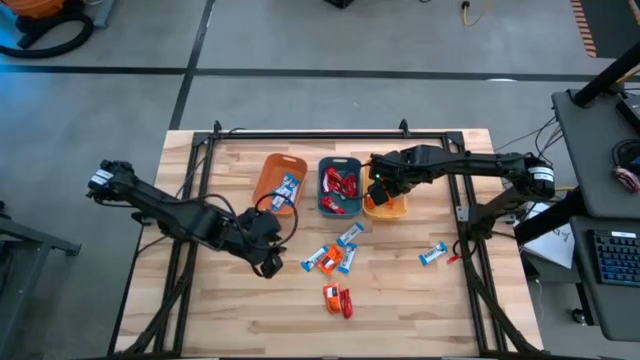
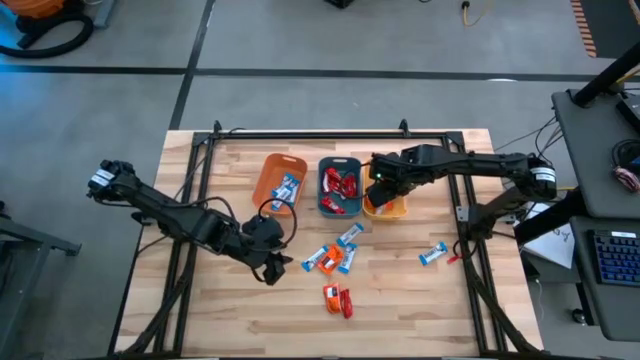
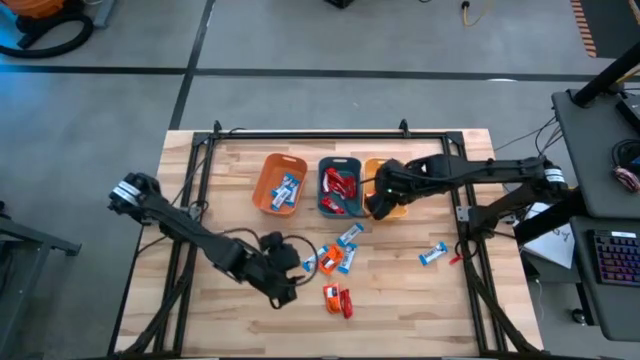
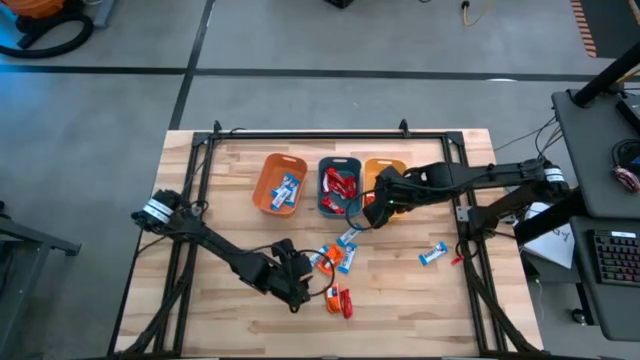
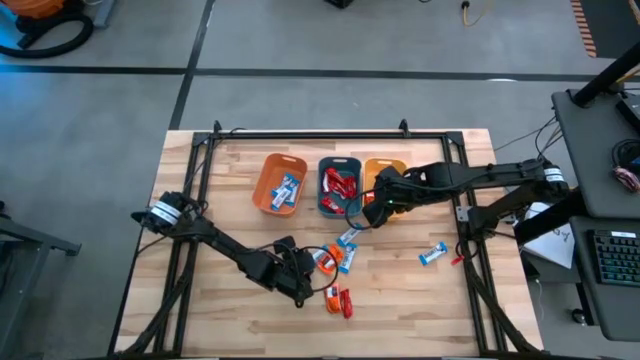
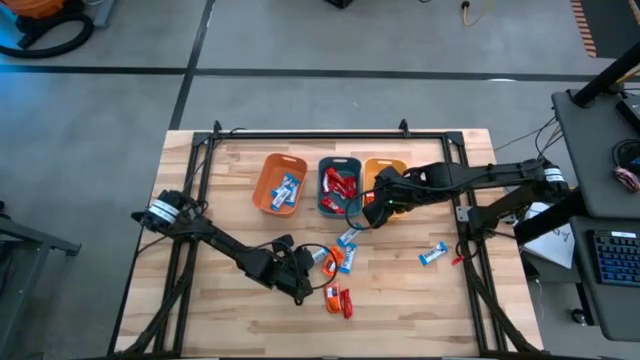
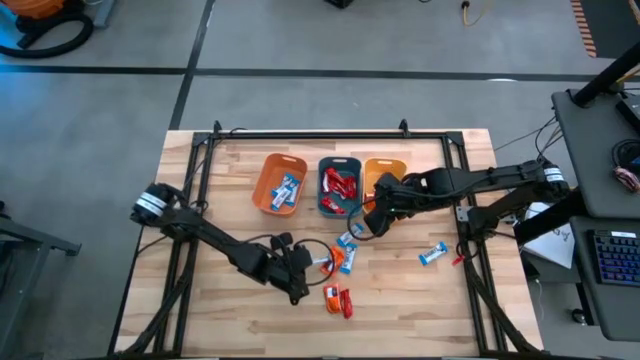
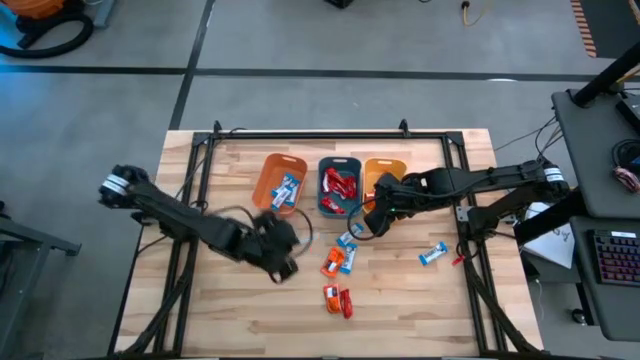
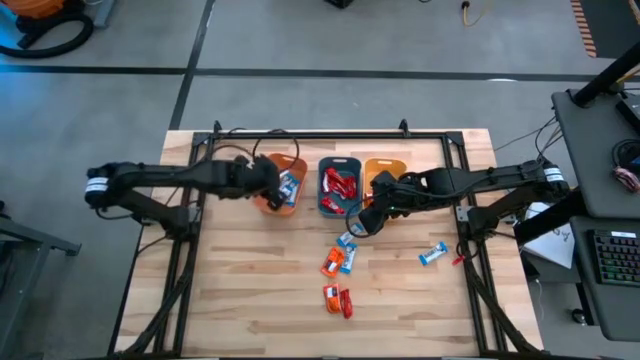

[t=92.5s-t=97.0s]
Task: Sort candy
Put the white chocolate bar into the orange bin

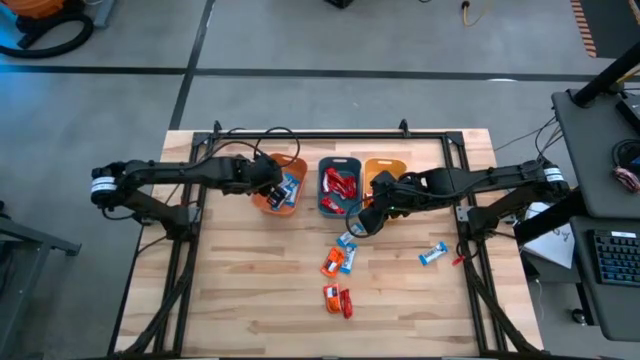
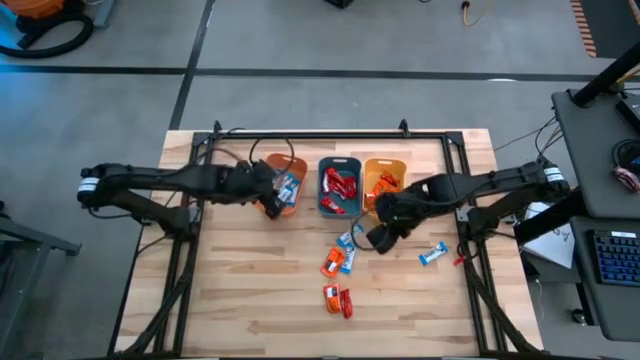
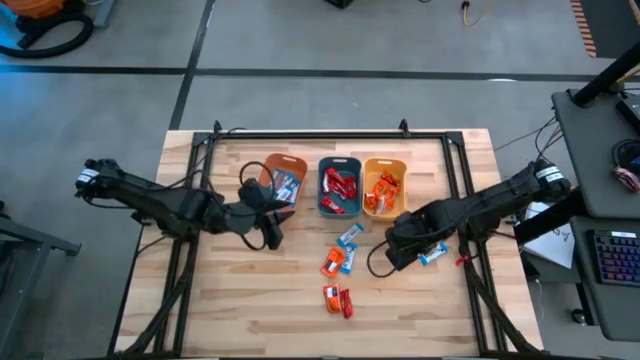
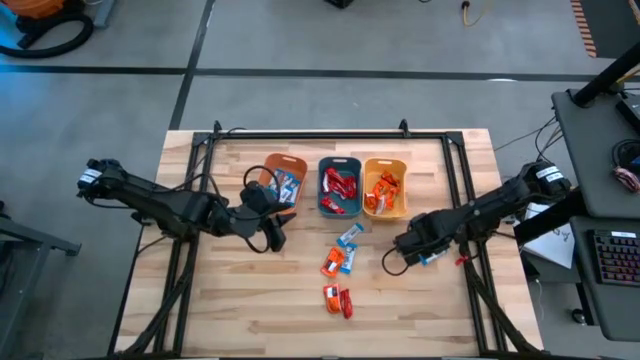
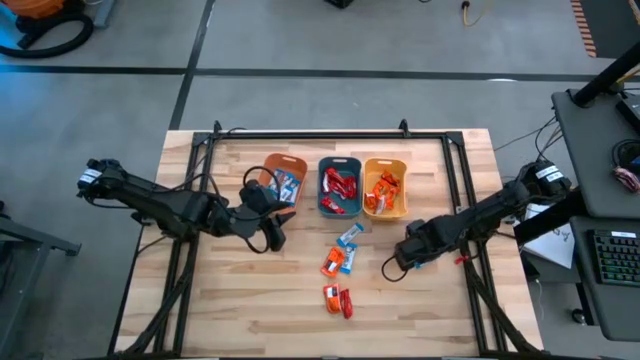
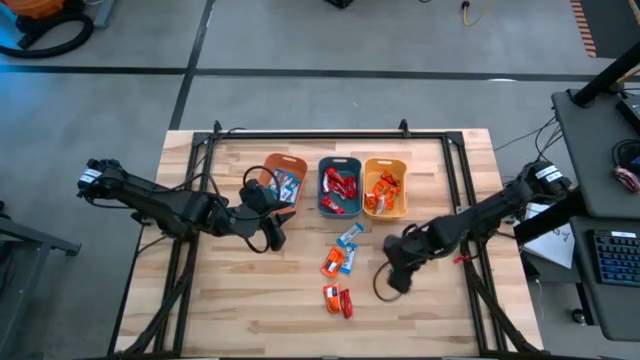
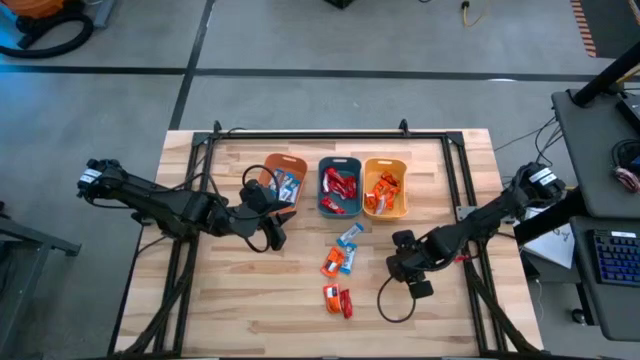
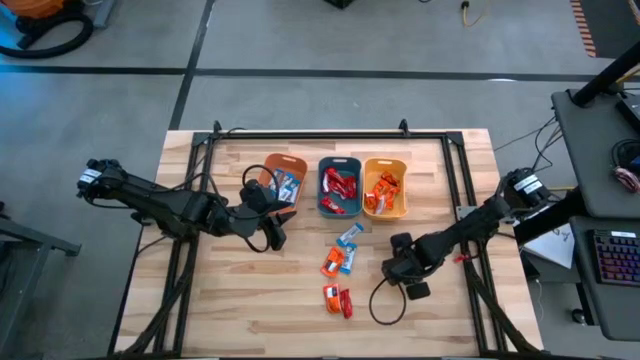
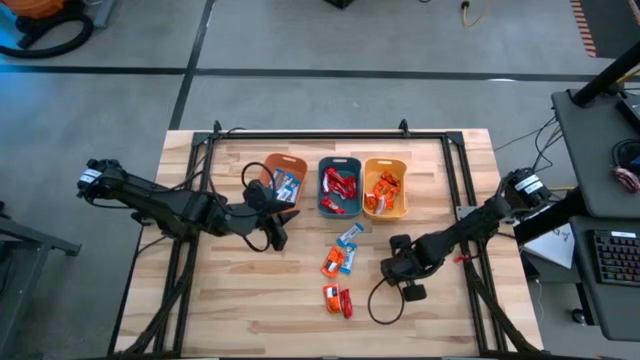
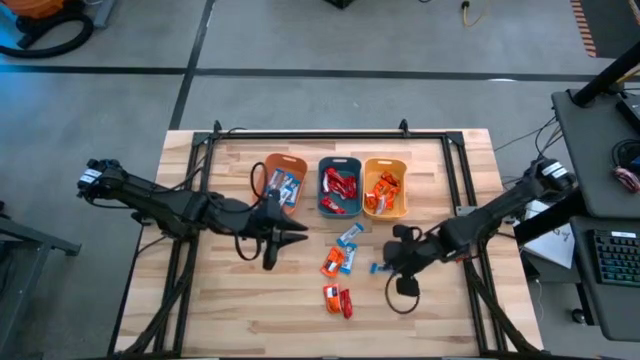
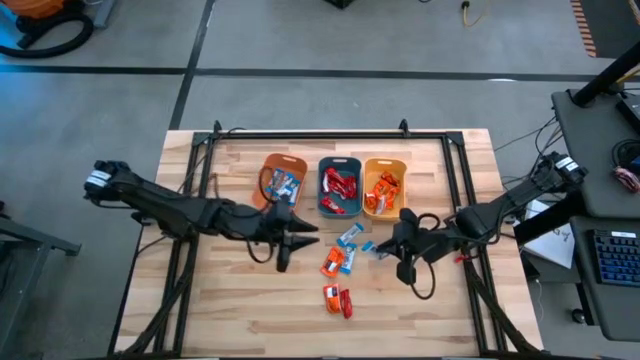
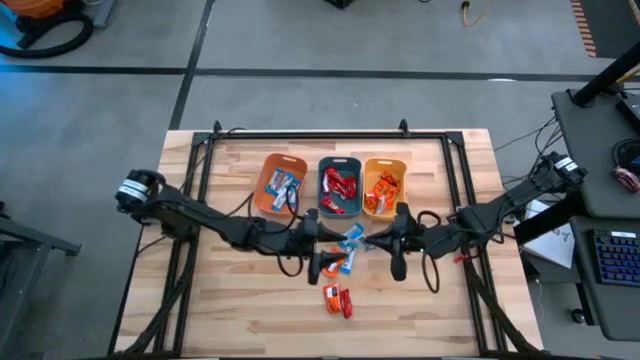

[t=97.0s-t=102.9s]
Put the white chocolate bar into the orange bin

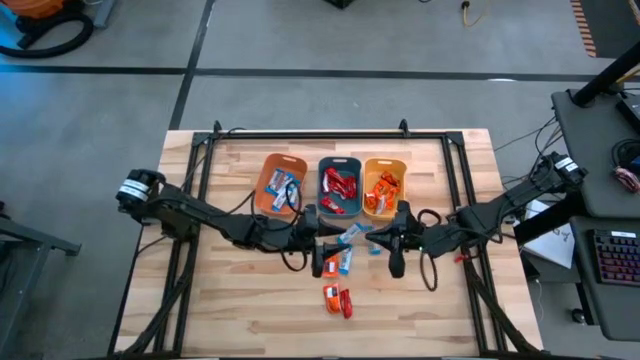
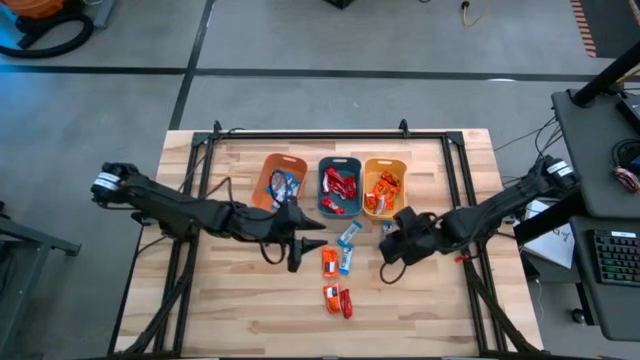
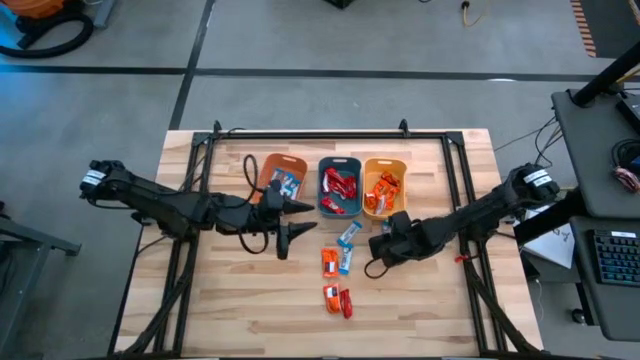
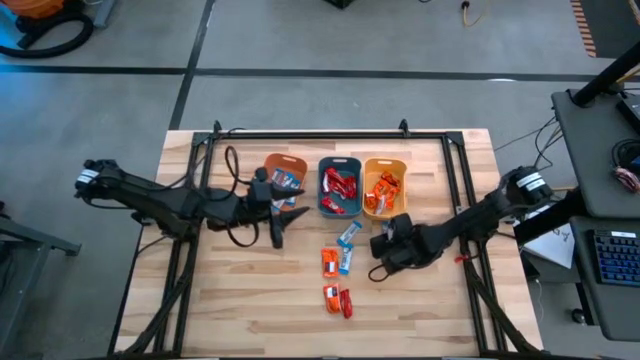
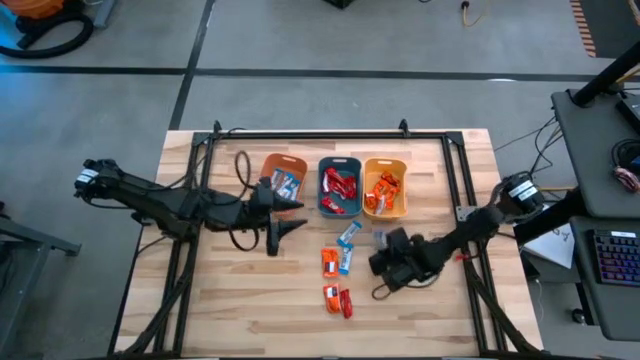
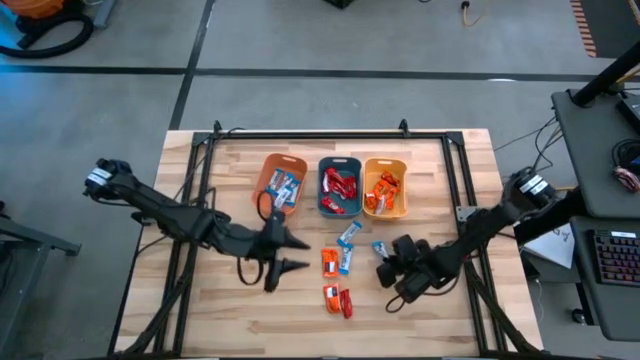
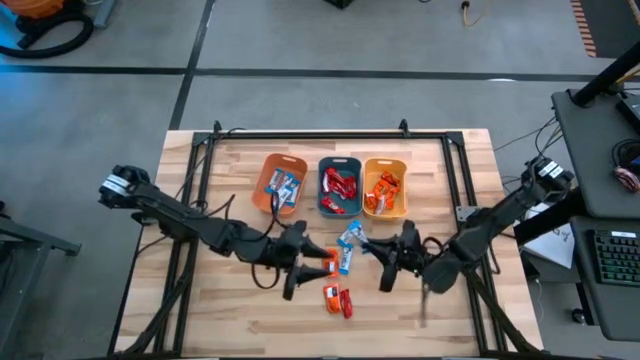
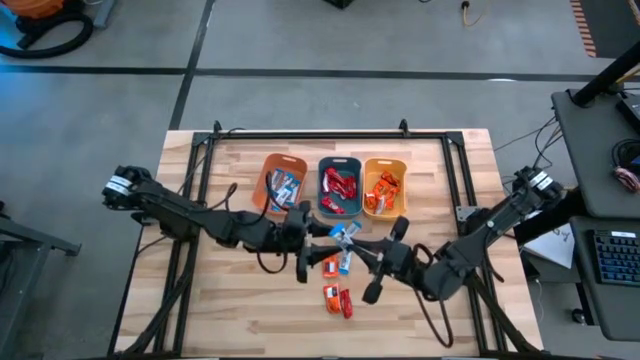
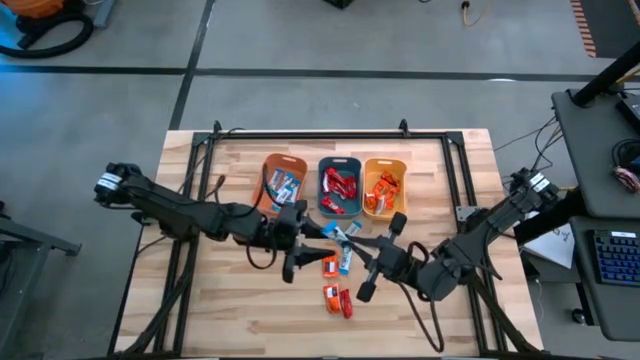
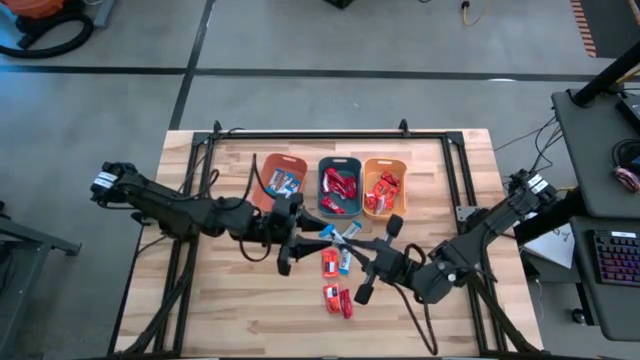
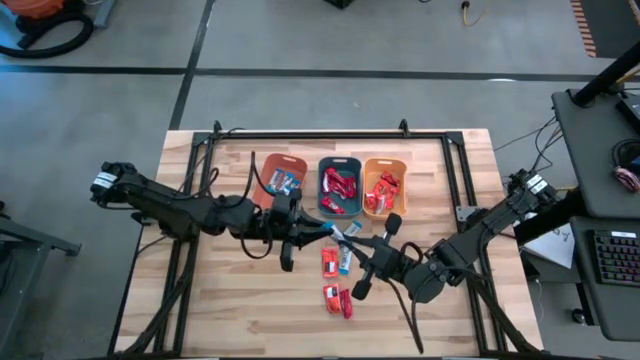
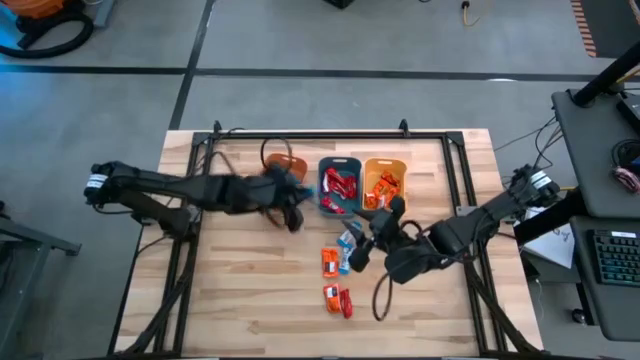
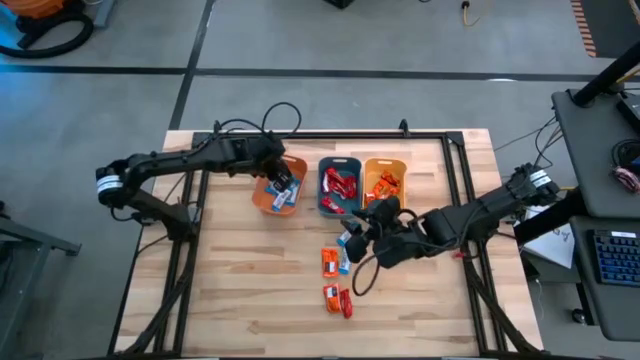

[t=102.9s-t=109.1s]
Put the white chocolate bar into the orange bin

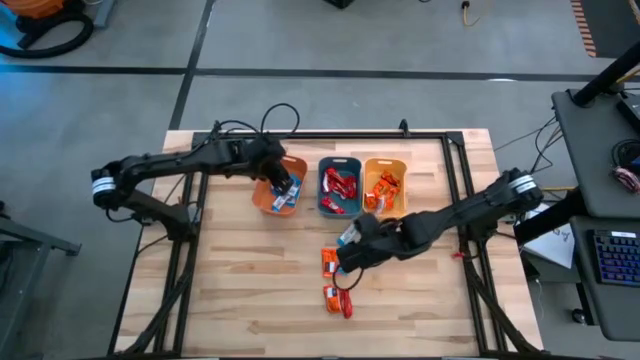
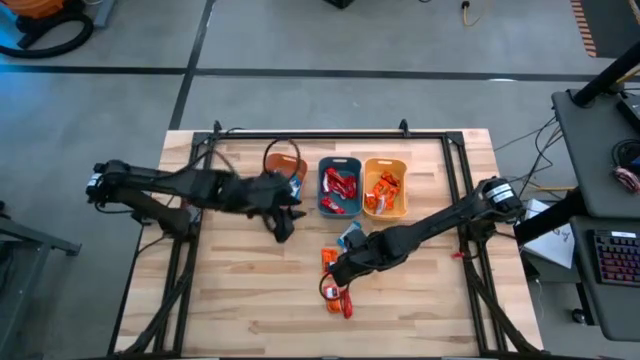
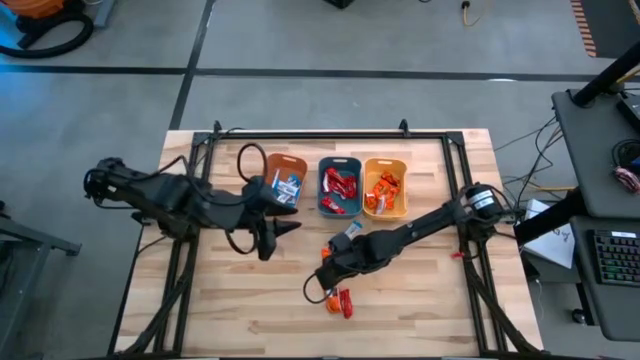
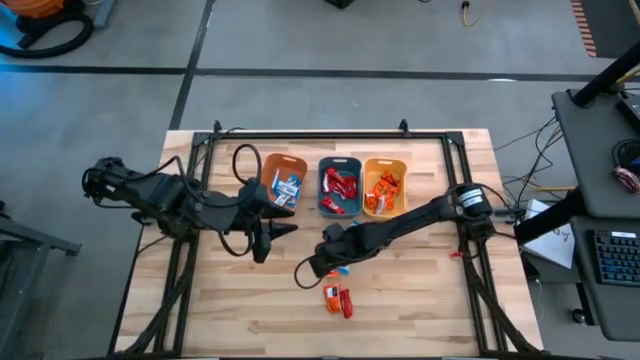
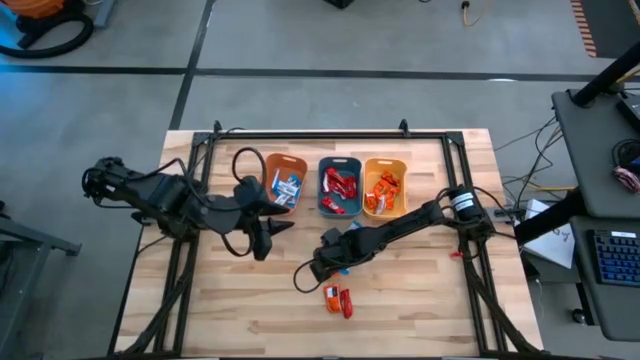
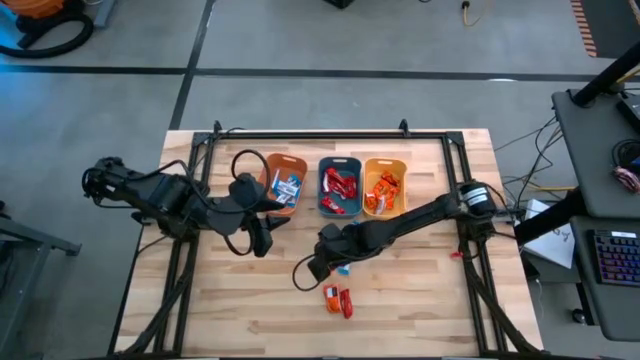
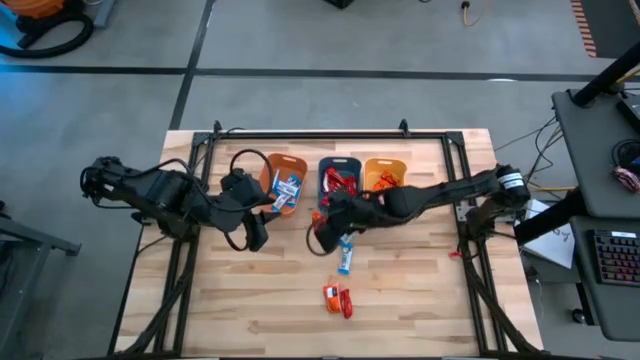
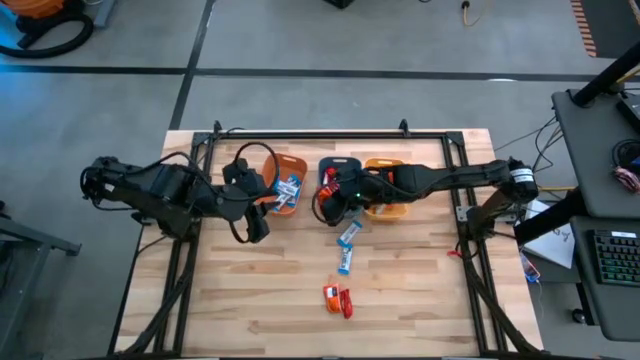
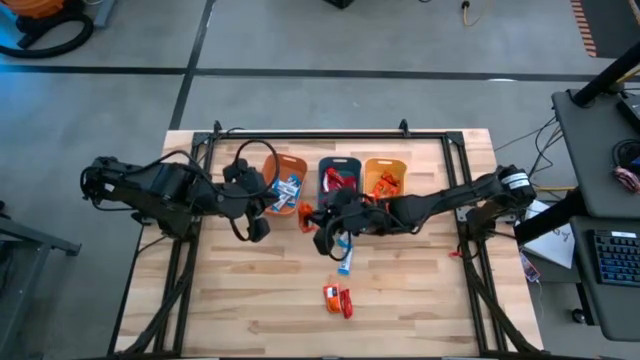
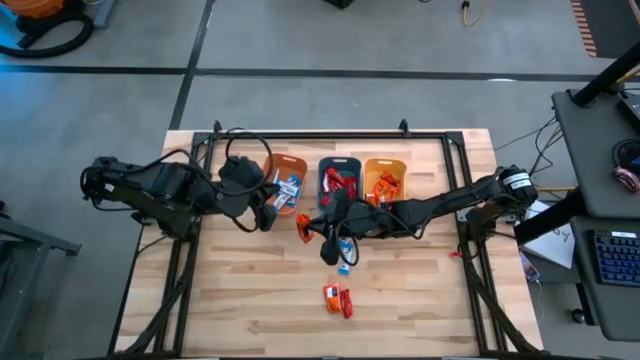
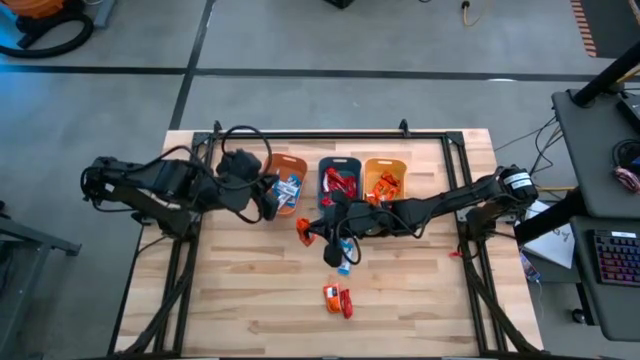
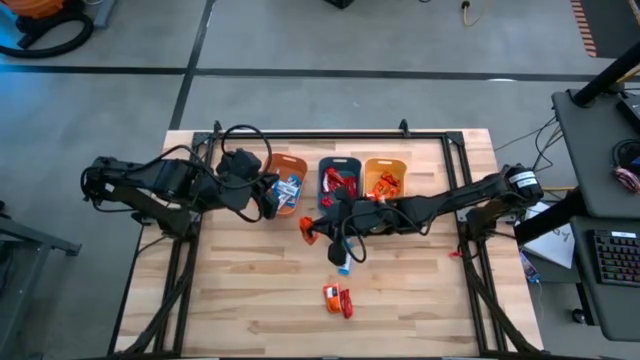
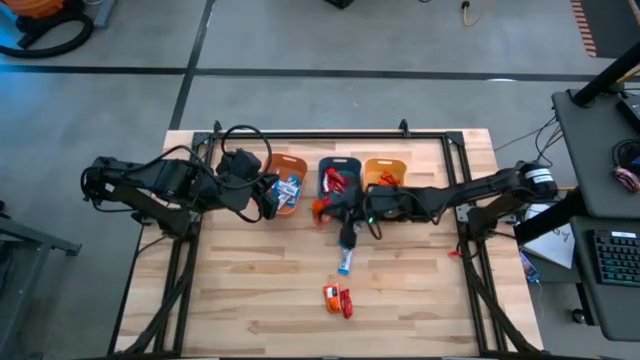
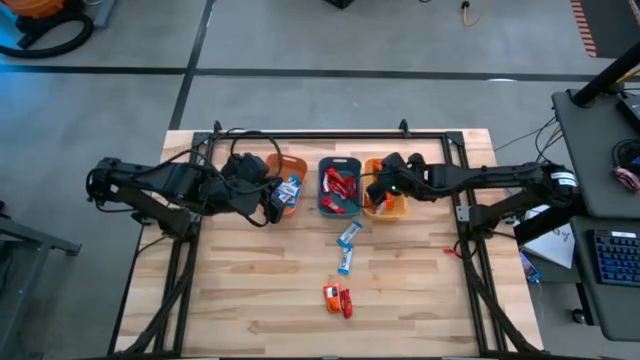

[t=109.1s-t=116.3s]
Put the orange chocolate bar into the yellow bin
